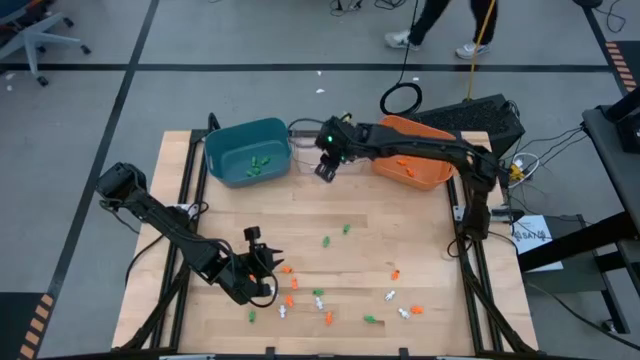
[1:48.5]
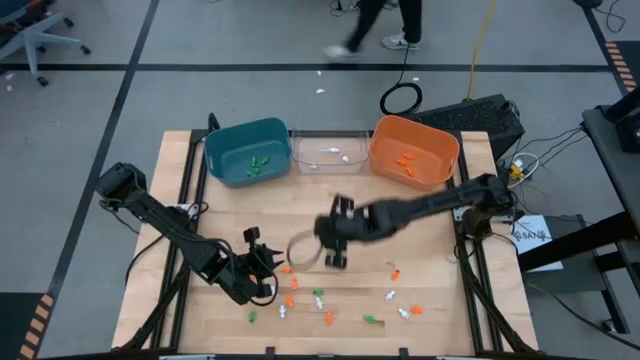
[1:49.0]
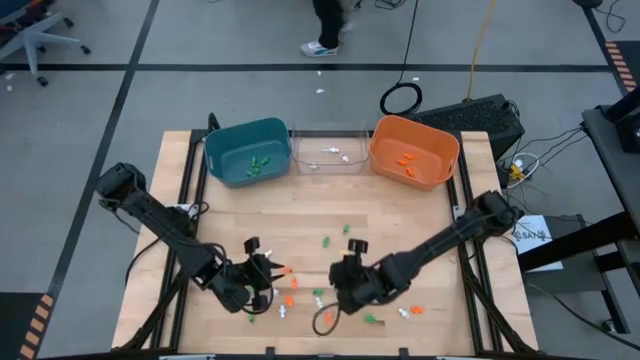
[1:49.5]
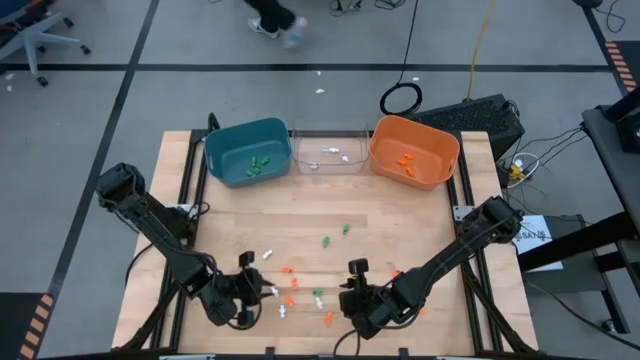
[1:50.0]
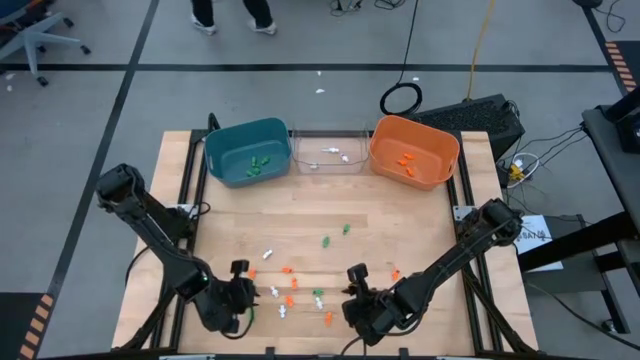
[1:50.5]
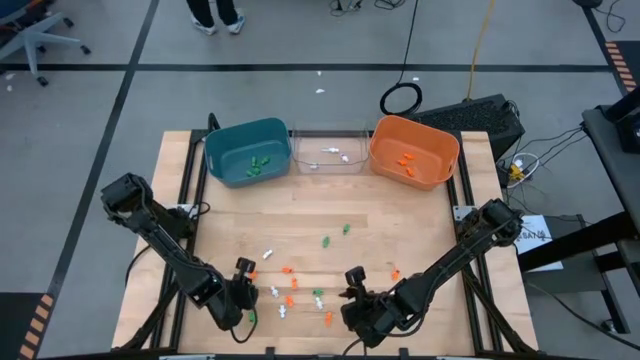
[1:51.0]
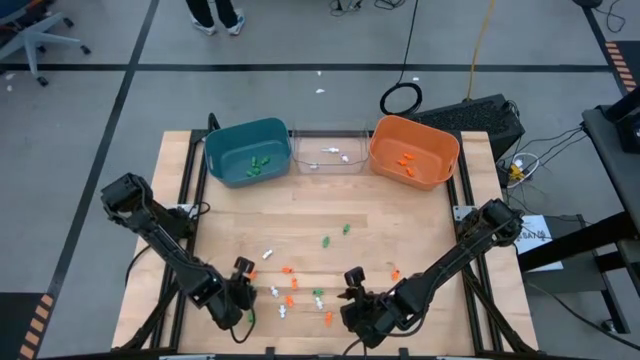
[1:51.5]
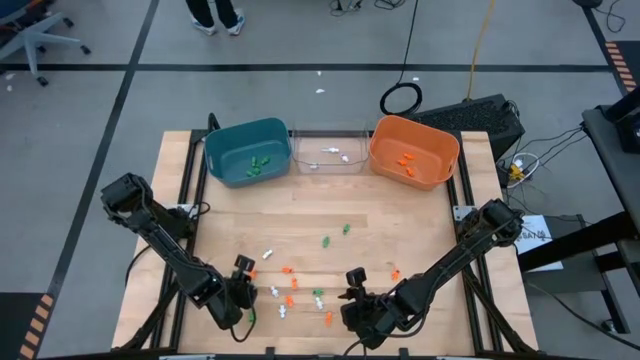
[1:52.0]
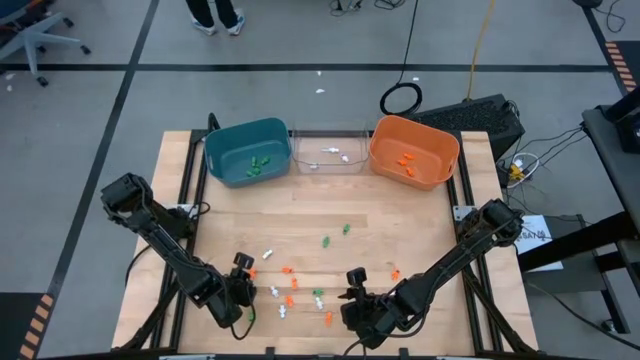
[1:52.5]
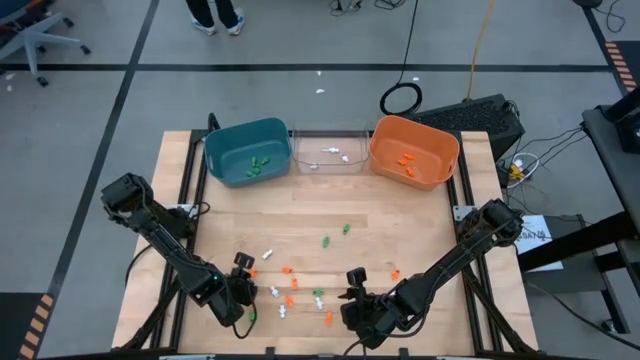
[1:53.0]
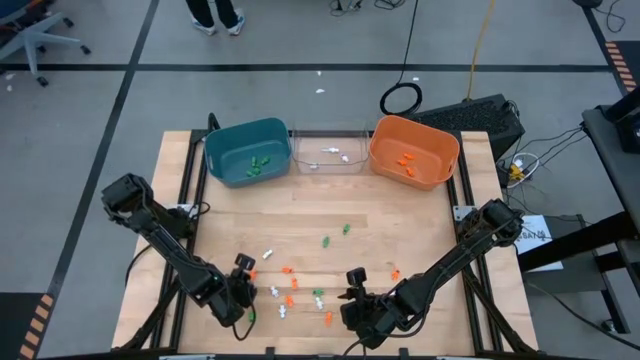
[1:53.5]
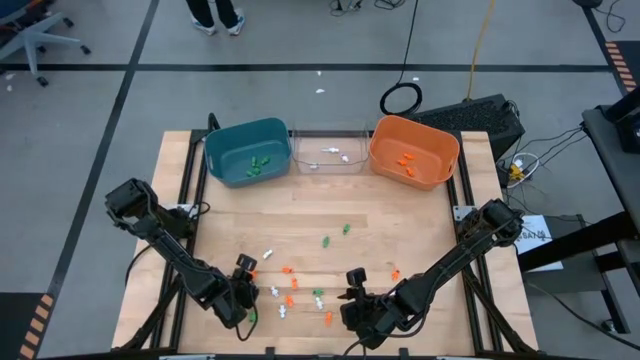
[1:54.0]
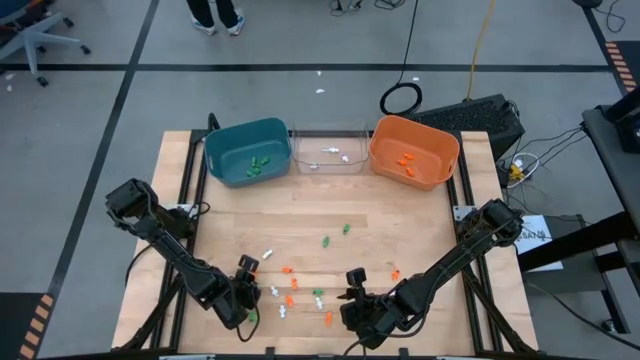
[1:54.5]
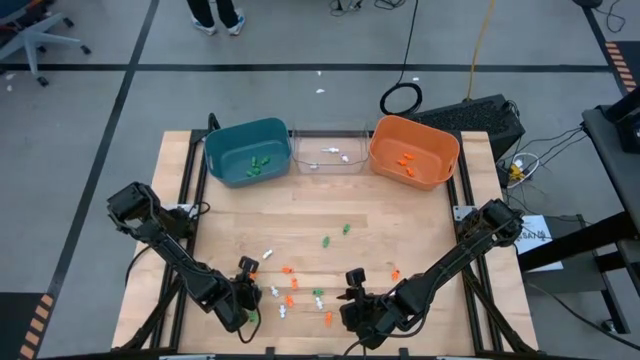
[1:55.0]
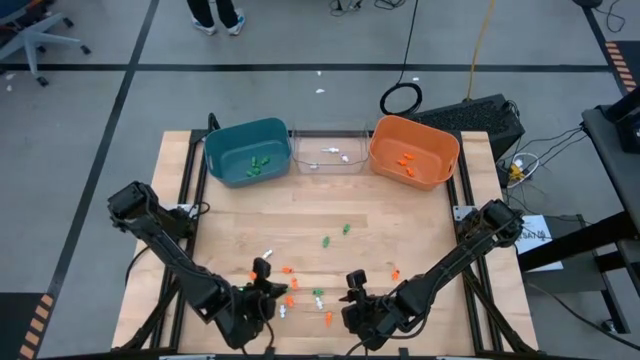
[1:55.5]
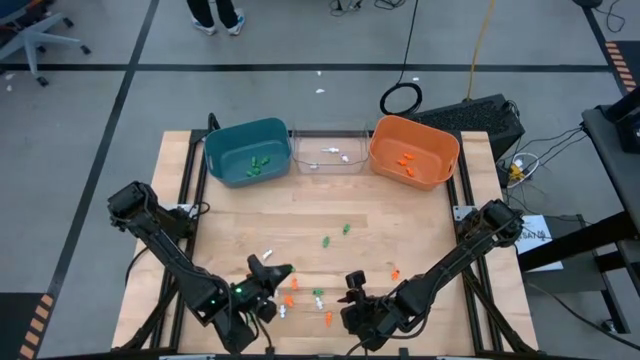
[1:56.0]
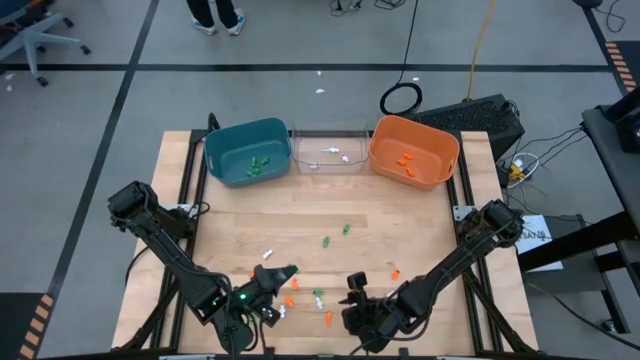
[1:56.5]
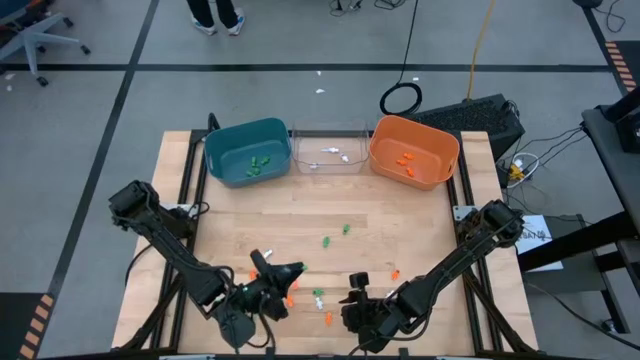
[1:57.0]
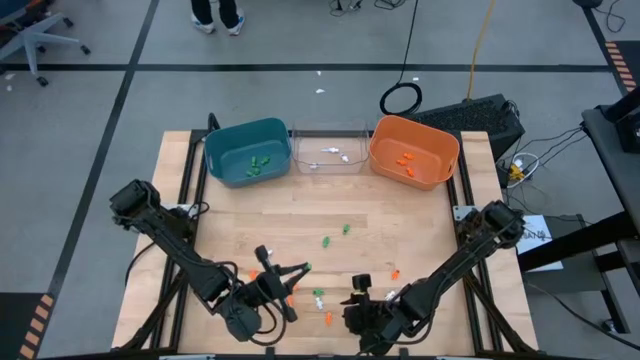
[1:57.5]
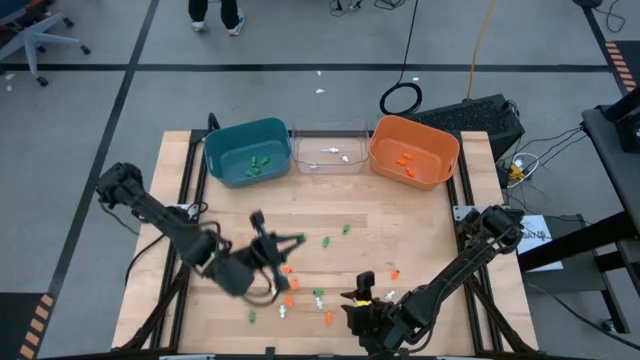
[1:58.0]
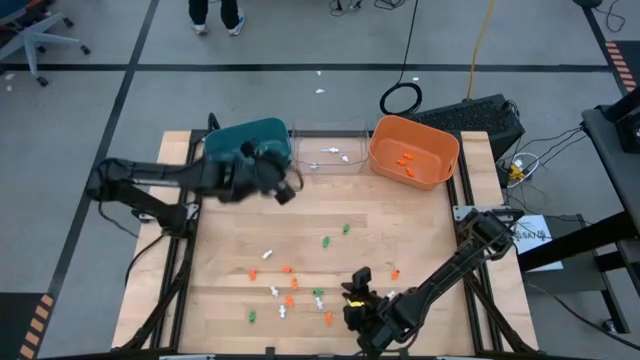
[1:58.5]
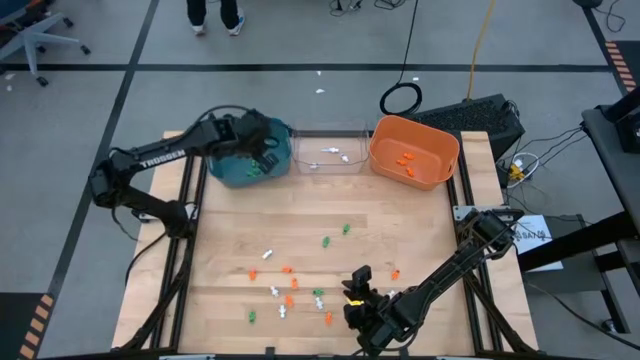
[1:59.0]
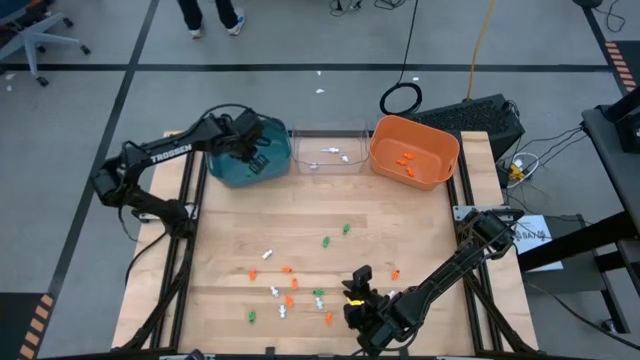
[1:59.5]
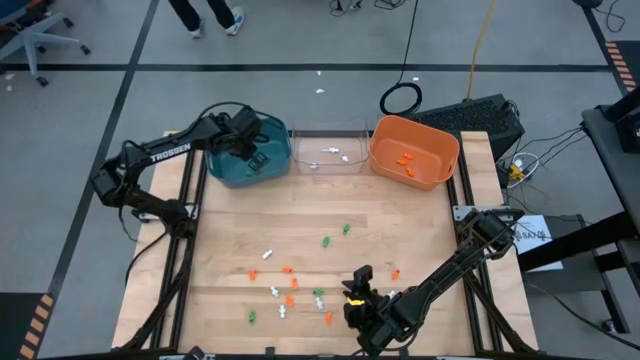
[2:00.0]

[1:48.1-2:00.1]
Task: Sort Halloween decoration
Put the green skeleton toy into the blue bin

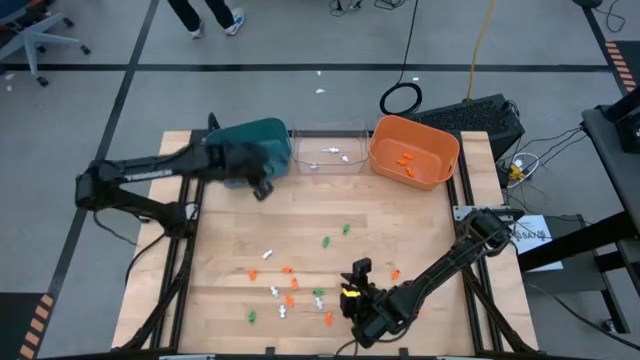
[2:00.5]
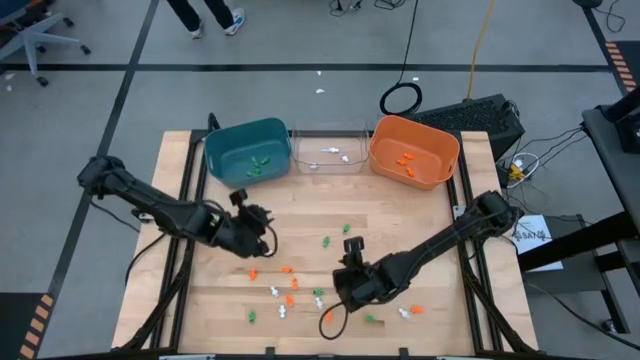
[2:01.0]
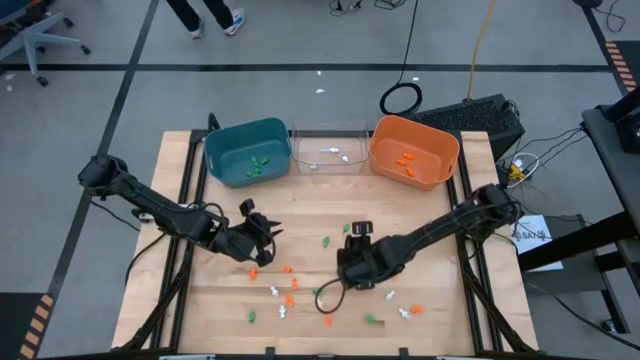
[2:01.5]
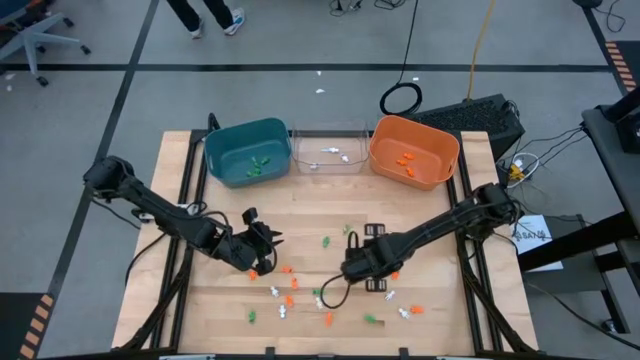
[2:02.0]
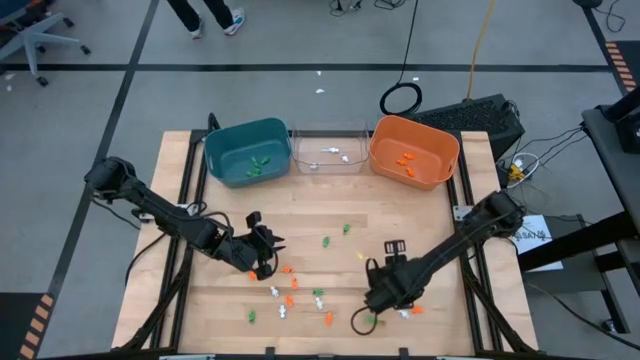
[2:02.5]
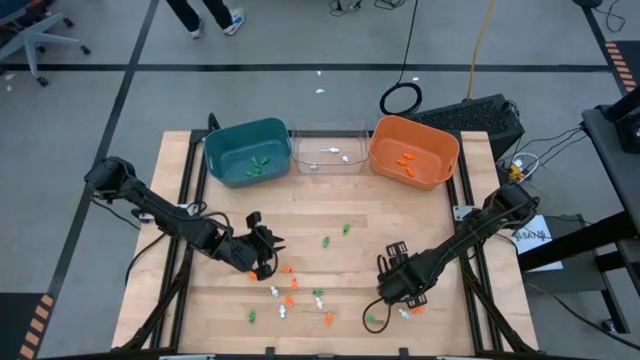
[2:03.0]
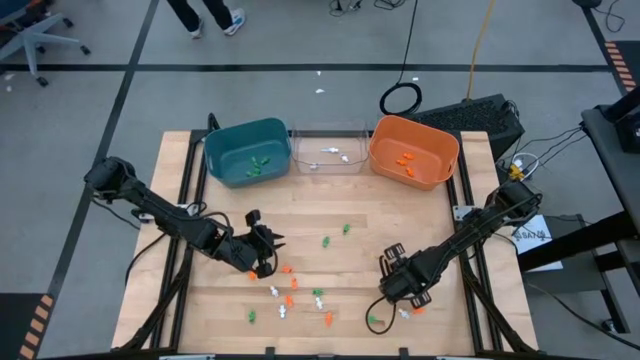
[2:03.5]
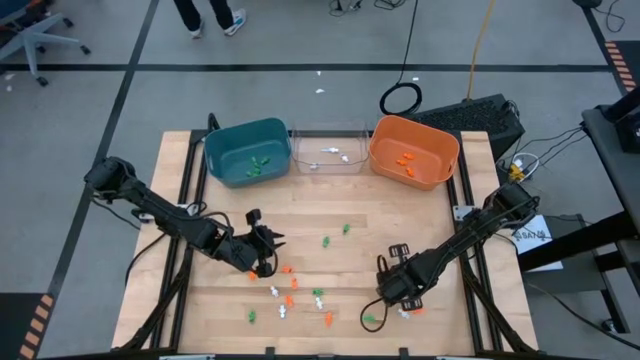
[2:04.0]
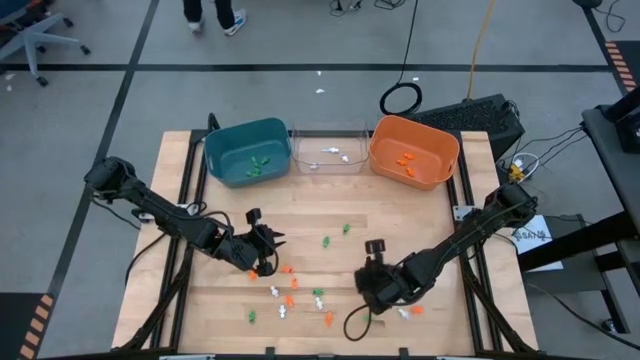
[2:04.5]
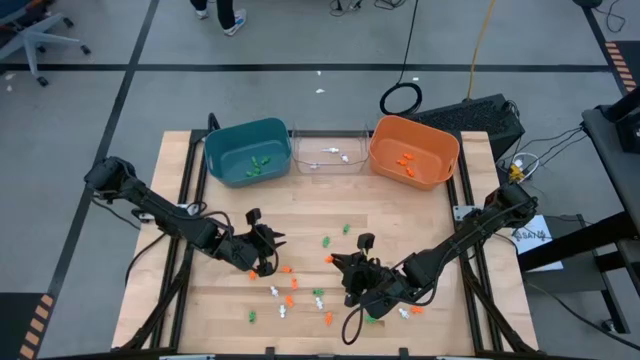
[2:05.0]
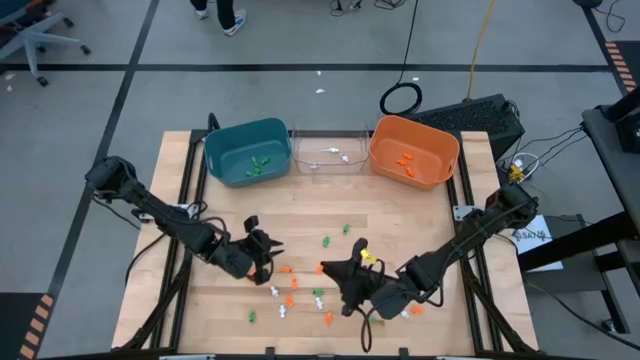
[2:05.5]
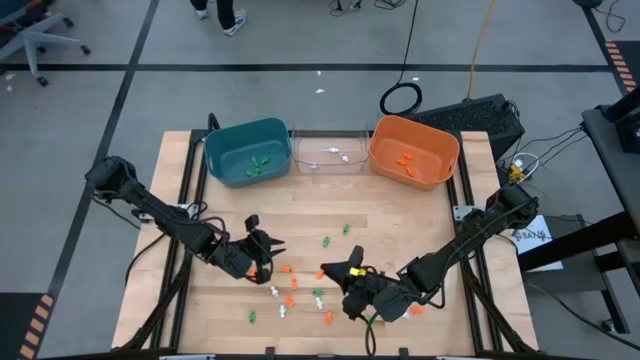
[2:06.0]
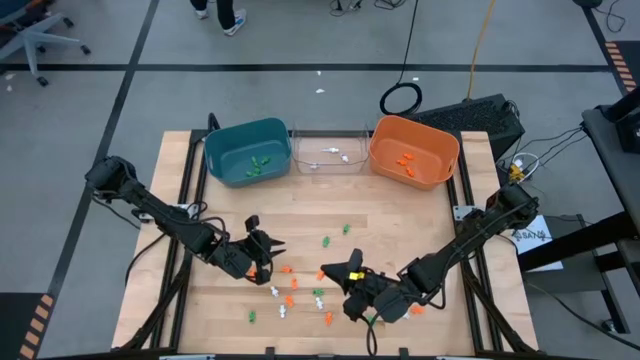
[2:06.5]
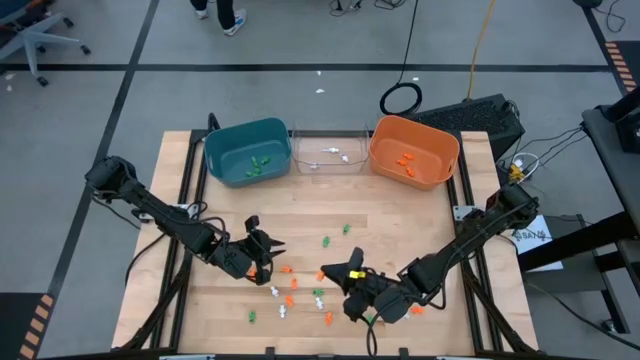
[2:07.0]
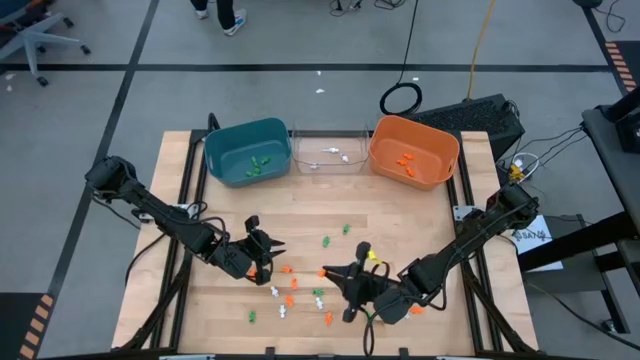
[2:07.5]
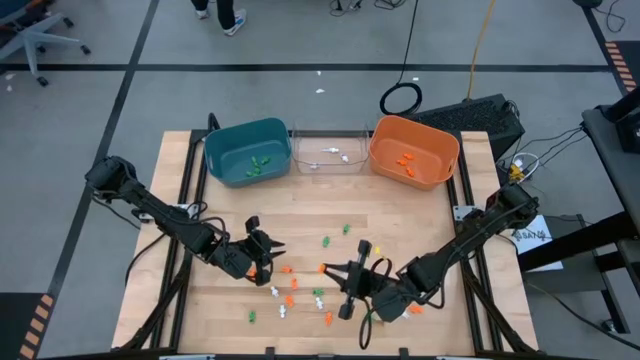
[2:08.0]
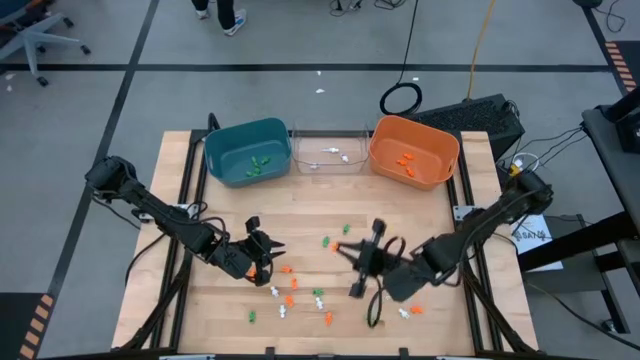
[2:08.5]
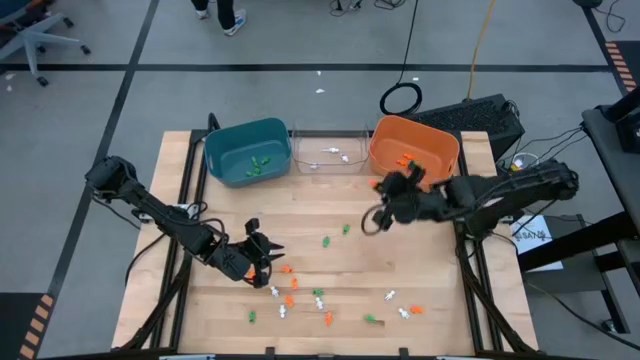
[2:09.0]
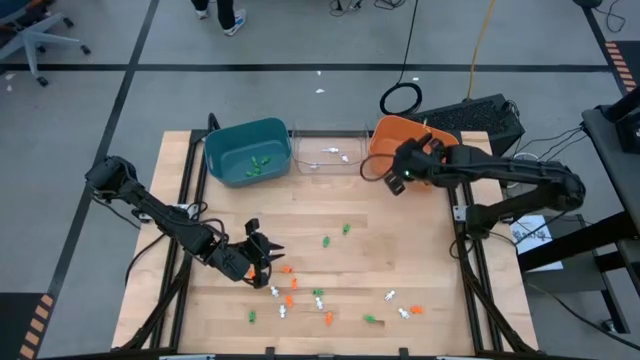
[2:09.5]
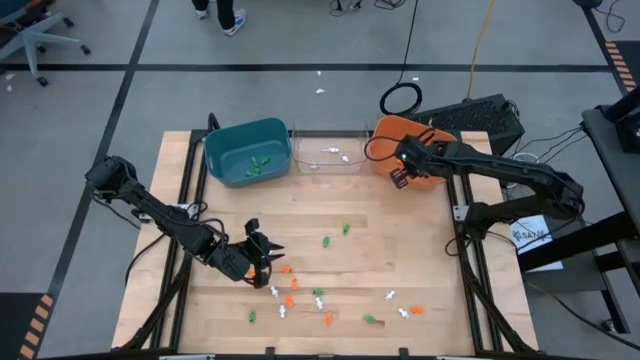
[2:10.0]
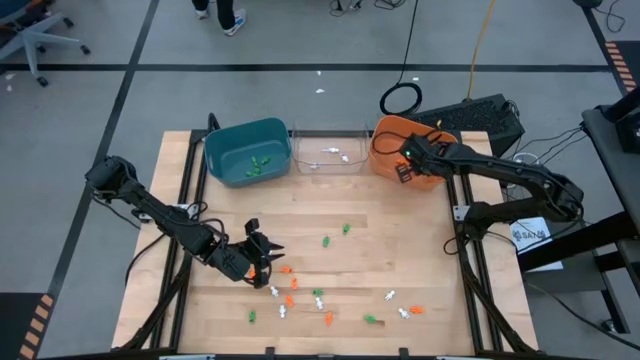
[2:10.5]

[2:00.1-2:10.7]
Put the orange skeleton toy into the orange bin
